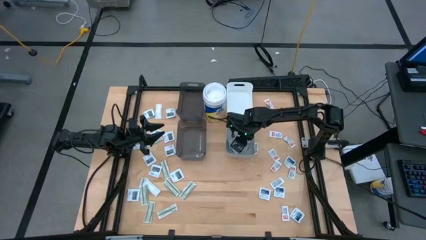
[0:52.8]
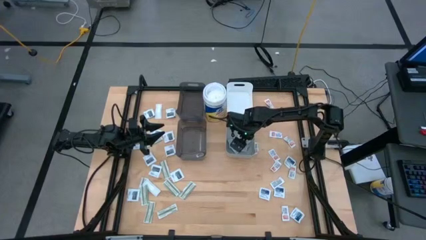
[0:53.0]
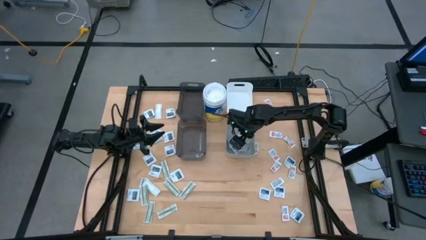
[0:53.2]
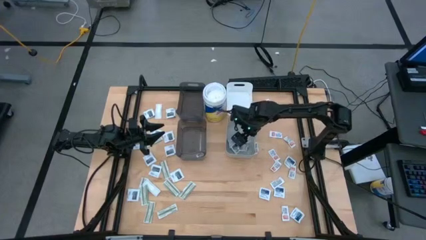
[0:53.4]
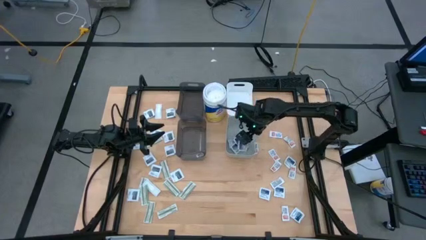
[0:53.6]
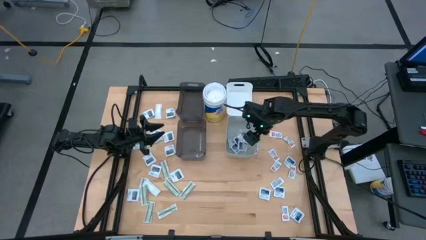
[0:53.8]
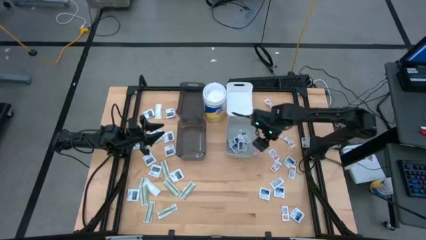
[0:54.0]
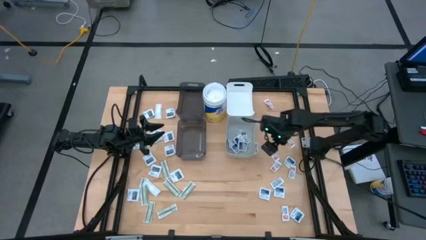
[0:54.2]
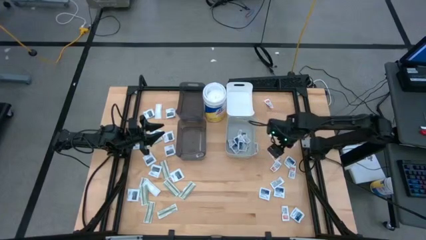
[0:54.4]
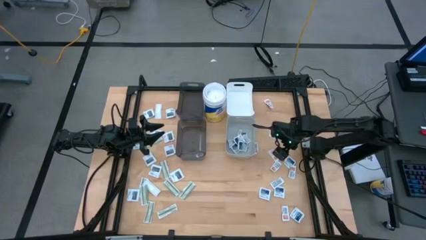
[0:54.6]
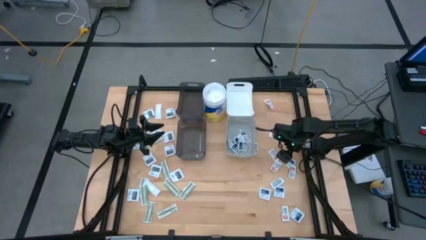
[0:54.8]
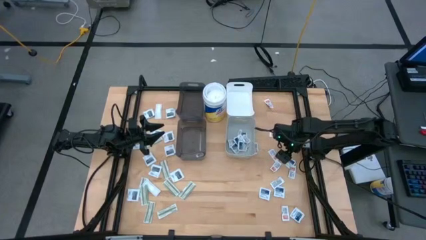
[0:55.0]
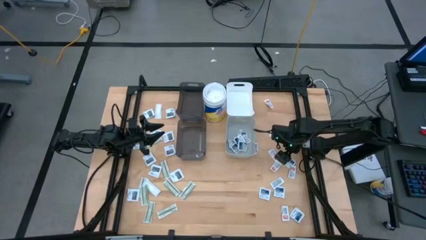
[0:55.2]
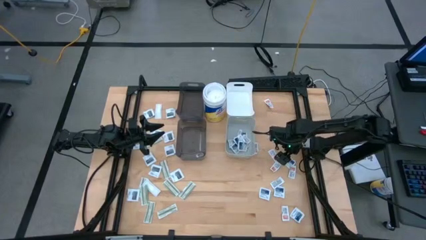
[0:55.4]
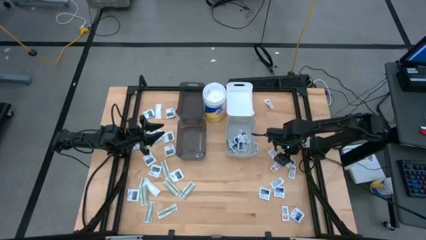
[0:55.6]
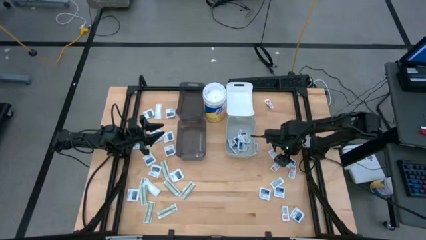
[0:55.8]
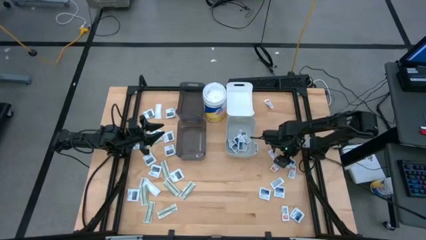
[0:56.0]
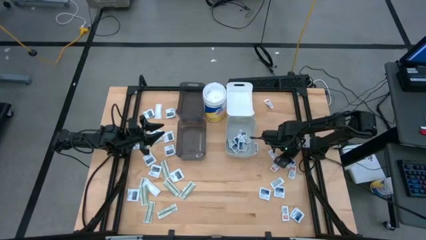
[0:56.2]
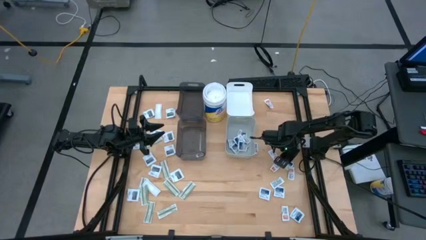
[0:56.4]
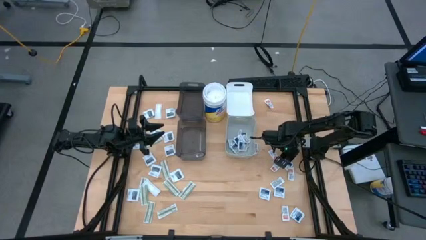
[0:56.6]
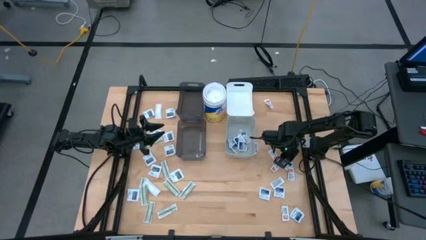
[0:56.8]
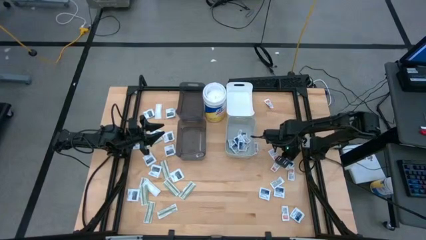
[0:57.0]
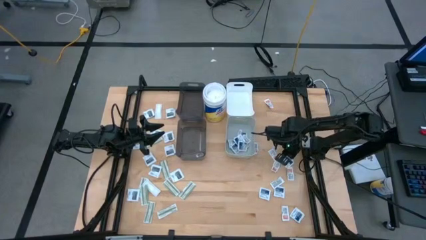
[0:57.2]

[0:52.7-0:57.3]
Task: Pick & Place First Aid Supplies
Put the alcohol pad into the gray bin

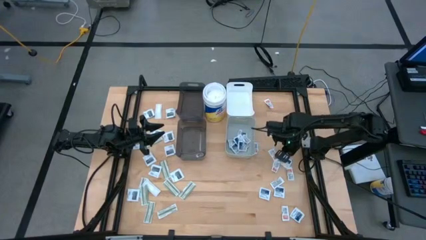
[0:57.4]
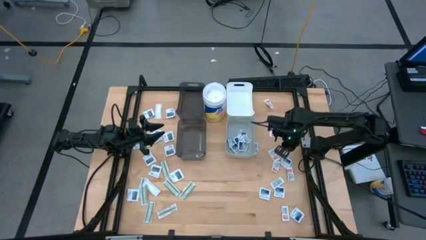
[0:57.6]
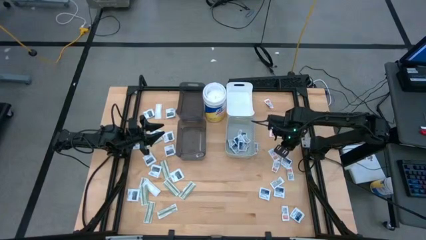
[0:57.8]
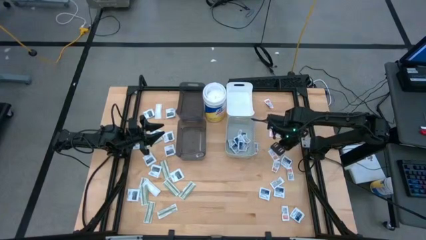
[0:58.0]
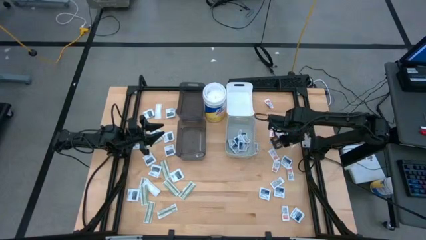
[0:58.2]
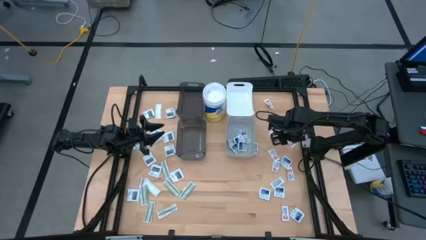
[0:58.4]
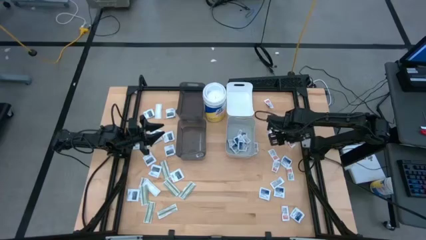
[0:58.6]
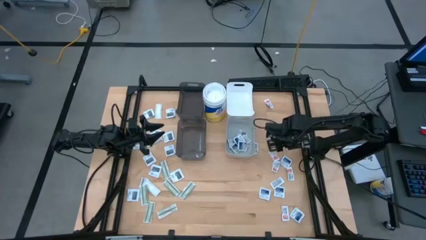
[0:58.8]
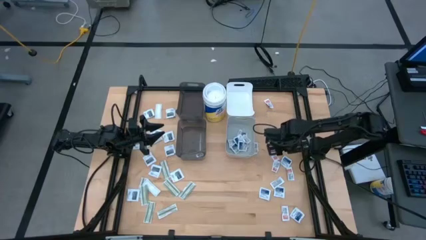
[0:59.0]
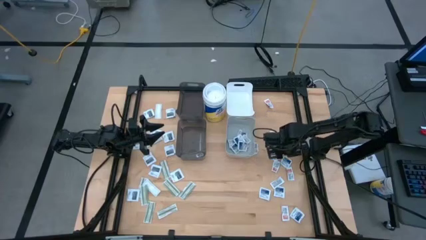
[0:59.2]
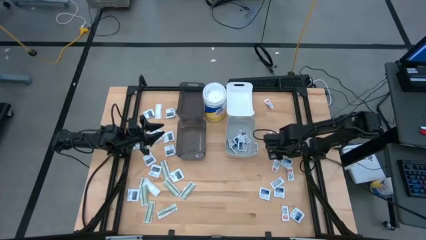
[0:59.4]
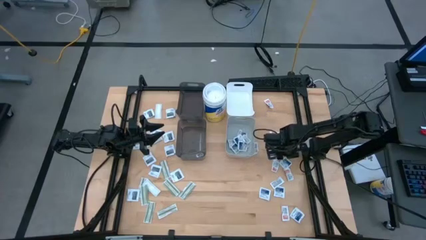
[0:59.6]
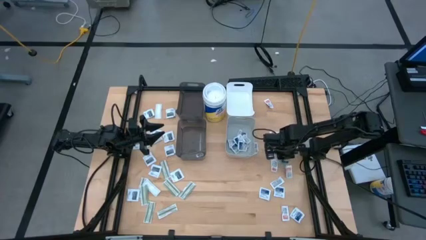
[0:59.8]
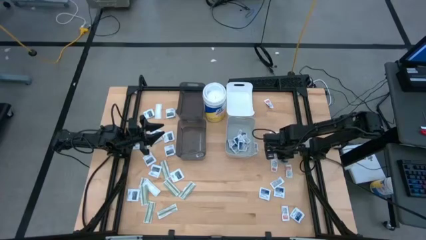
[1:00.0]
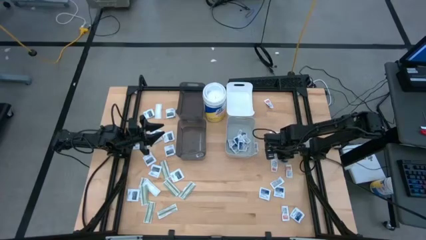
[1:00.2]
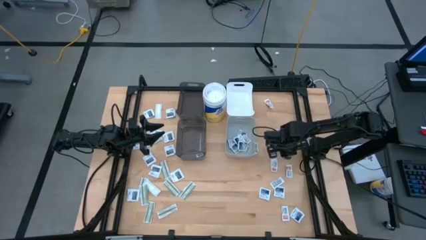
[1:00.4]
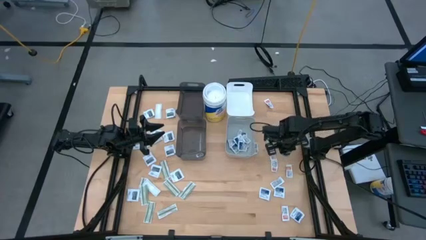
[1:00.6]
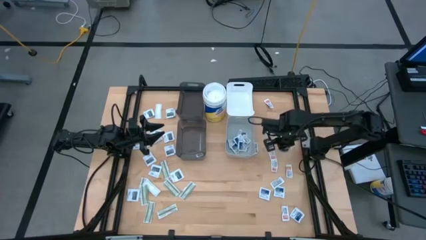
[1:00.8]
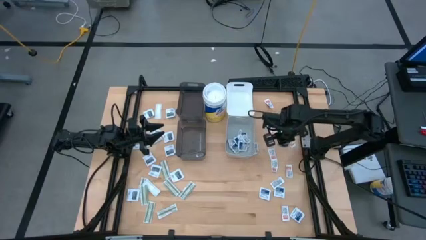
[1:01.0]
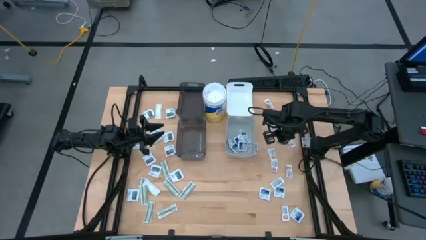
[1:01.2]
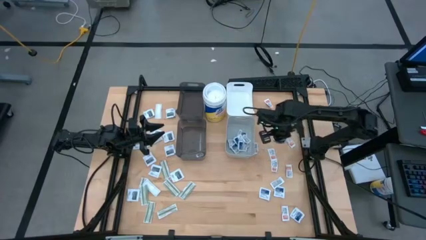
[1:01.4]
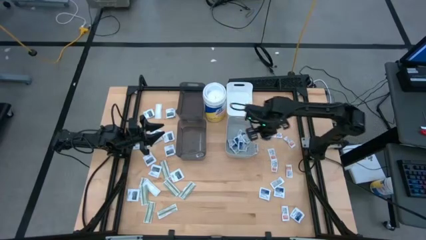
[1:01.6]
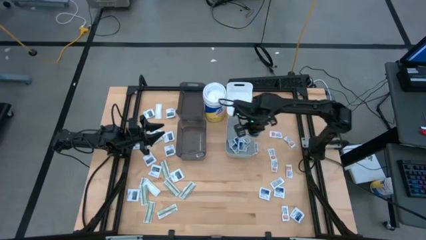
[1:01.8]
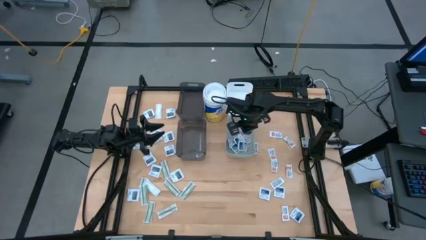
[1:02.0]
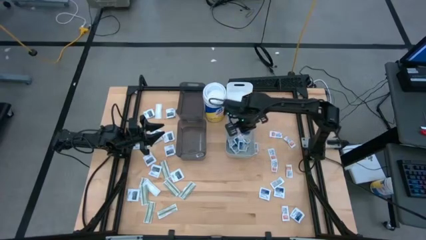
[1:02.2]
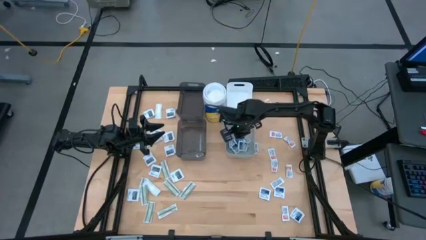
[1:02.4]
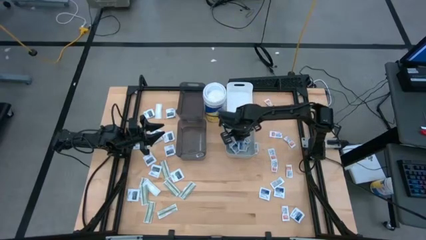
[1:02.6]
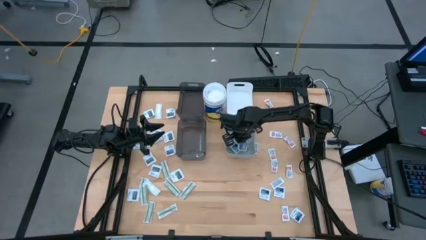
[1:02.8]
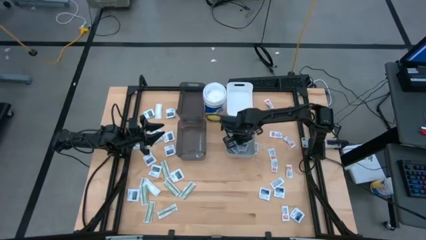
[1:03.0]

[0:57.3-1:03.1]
Put the alcohol pad into the gray bin

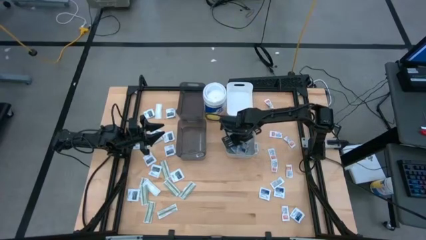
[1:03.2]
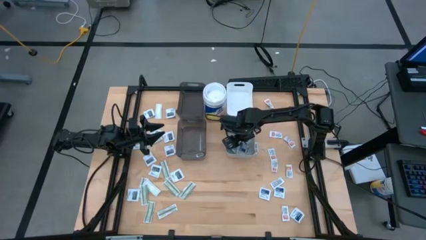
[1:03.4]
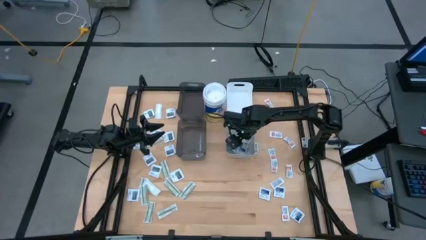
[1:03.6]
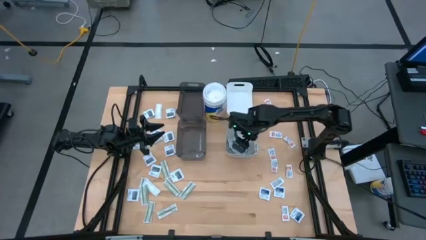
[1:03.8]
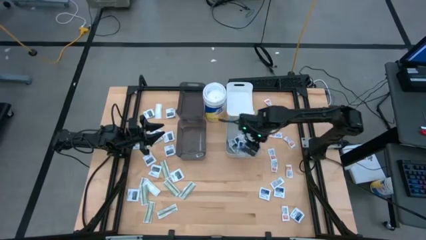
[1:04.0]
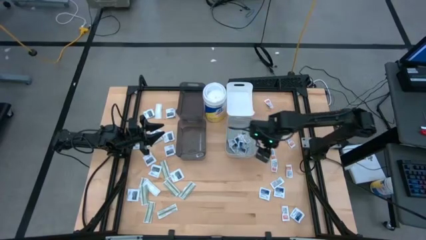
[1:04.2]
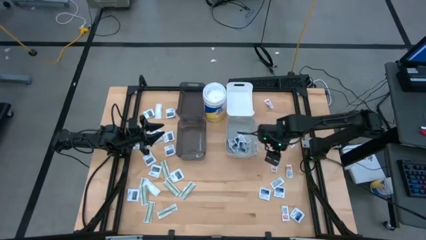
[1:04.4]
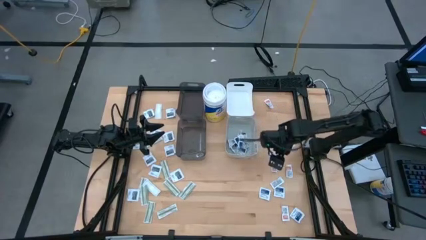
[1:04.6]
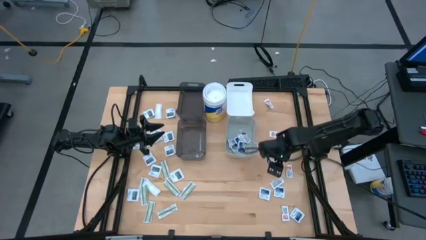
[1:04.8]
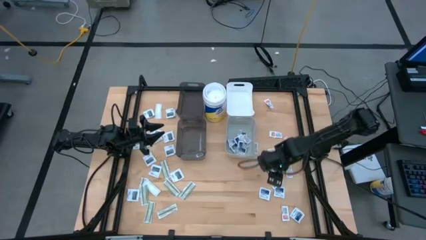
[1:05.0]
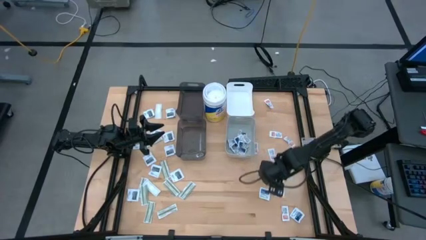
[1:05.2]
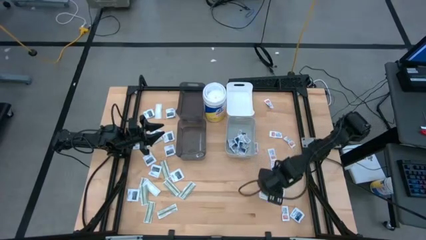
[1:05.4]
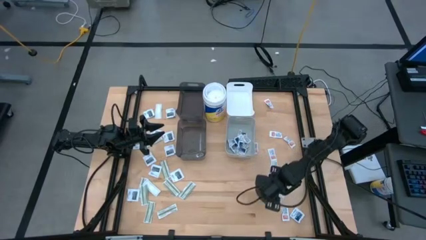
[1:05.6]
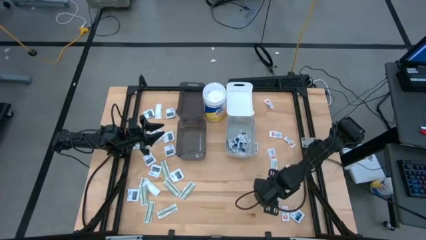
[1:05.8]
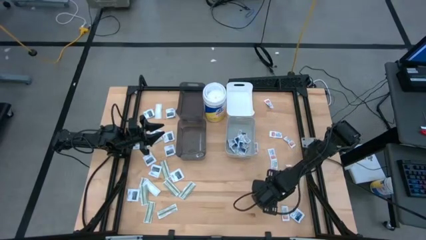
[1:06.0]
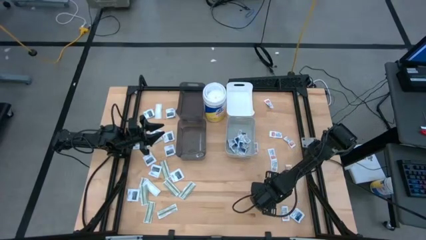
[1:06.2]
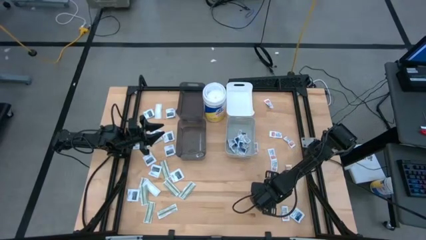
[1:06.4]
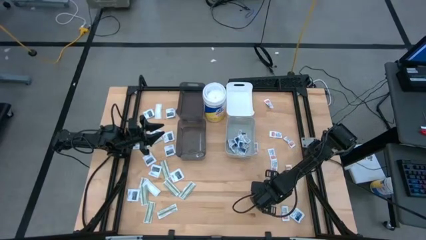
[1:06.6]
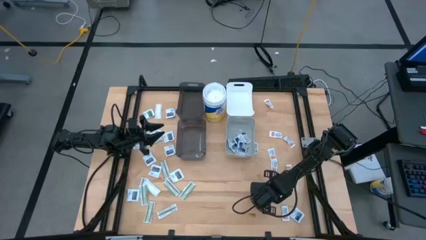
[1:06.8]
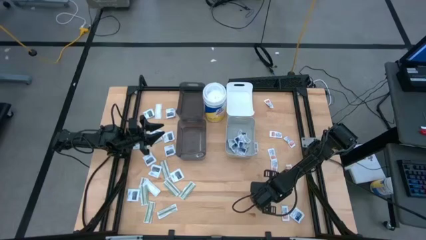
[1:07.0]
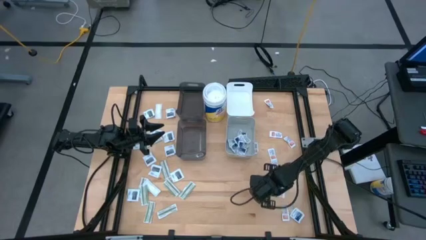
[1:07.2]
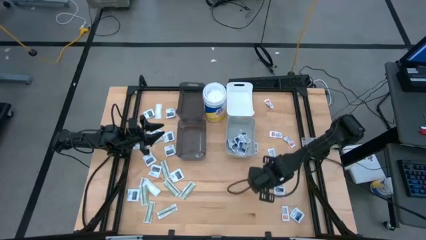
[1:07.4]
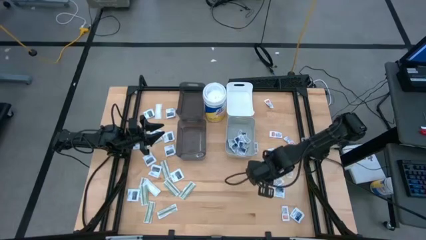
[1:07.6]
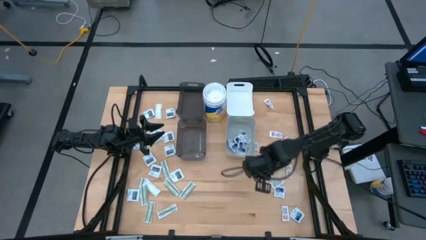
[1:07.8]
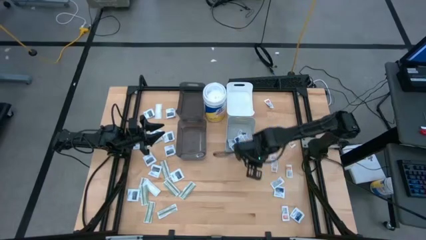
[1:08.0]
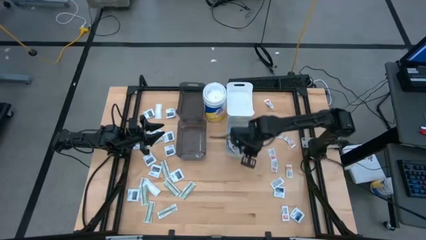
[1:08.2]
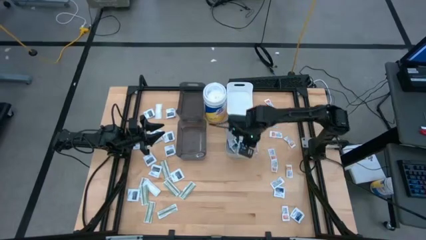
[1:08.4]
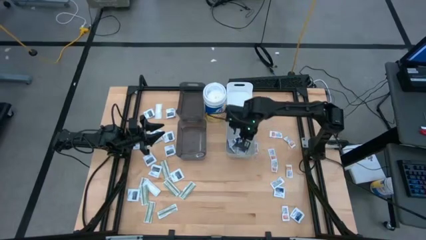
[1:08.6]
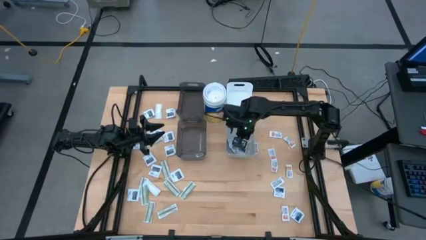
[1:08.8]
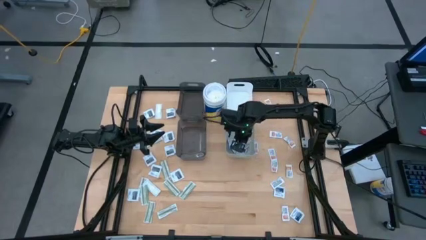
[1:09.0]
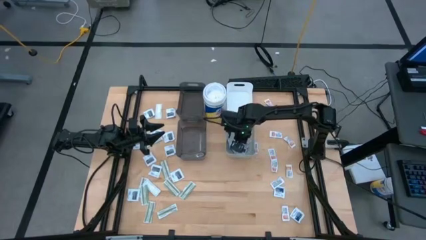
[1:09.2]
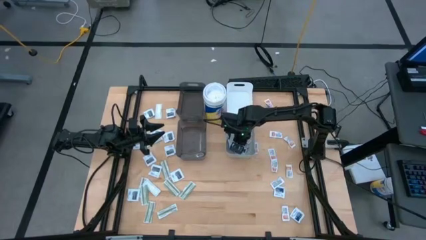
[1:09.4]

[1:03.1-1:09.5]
Put the top left alcohol pad into the gray bin
